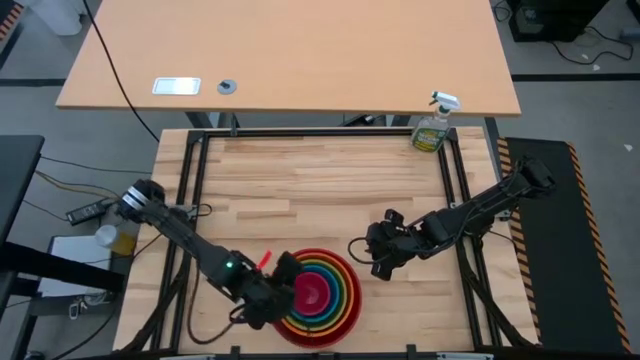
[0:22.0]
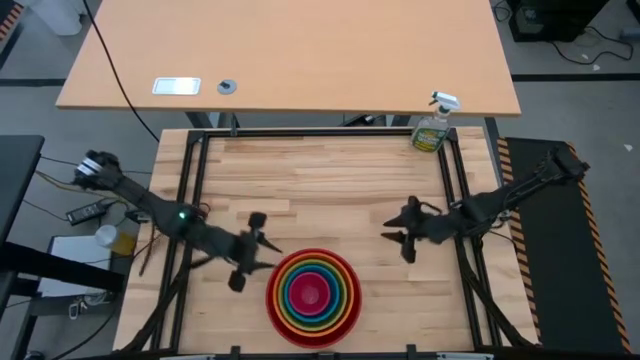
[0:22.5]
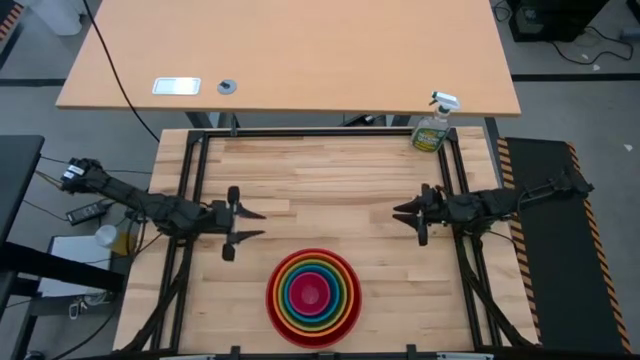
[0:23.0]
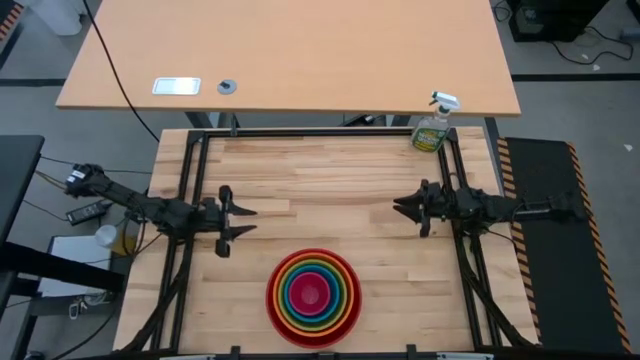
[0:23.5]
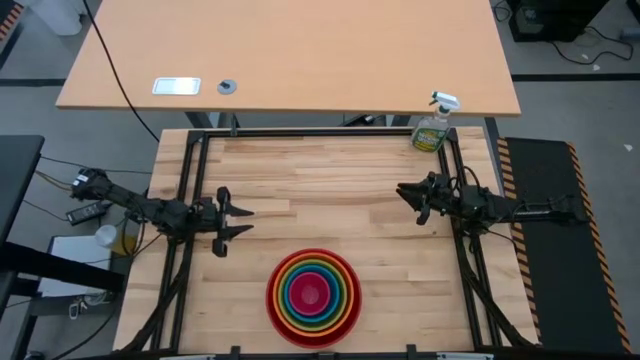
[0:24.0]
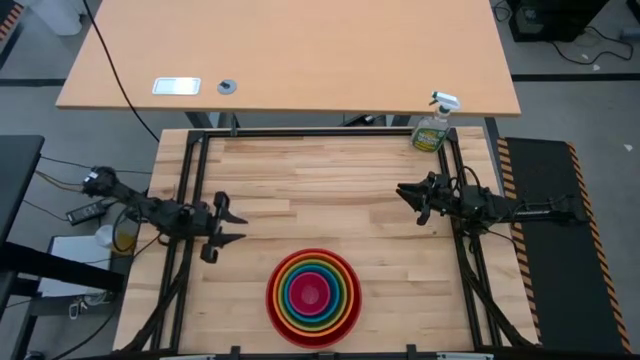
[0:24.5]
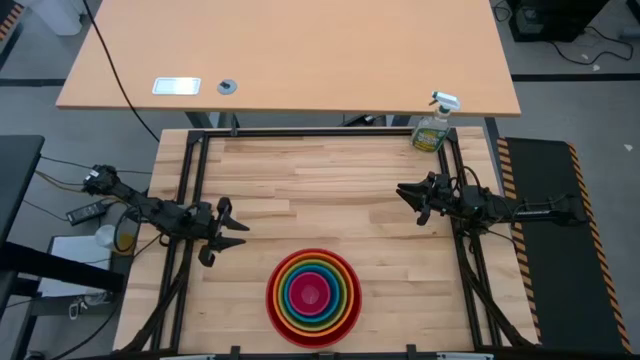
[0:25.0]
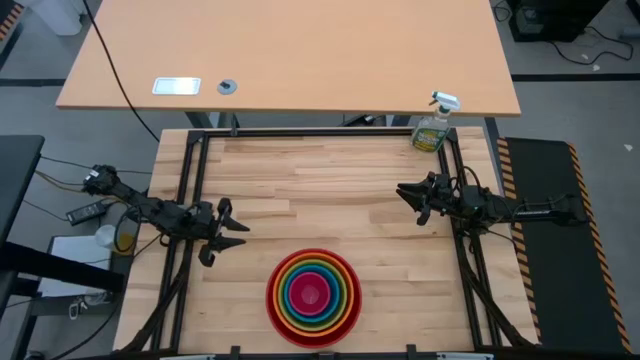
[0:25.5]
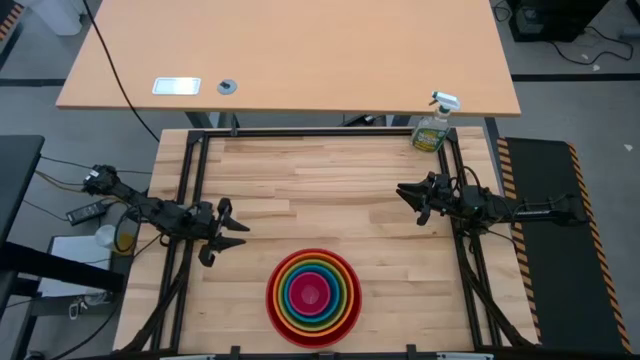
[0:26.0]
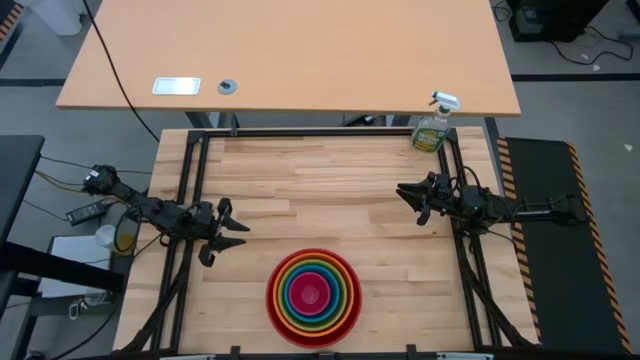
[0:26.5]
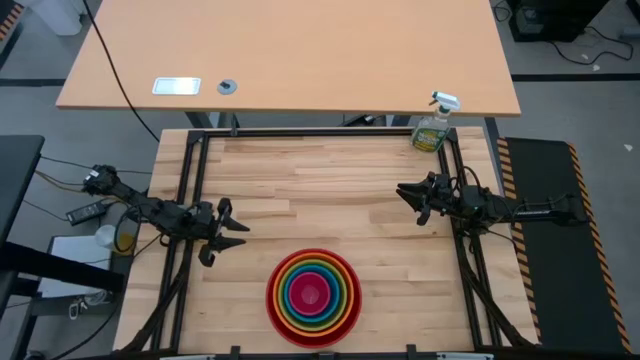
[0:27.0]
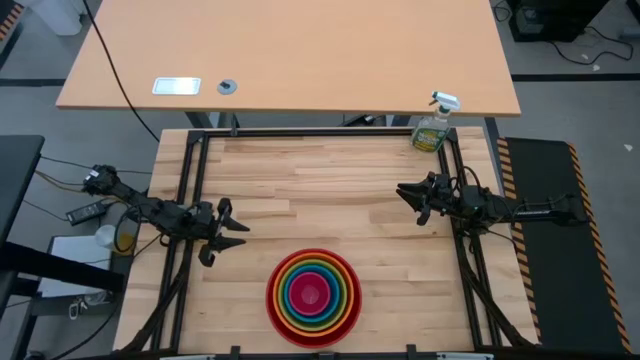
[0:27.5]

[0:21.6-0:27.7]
Return to Home Position

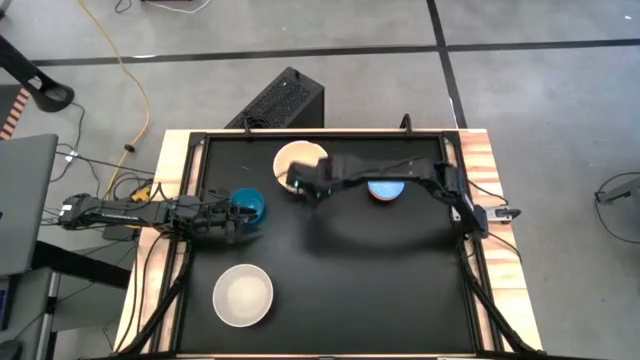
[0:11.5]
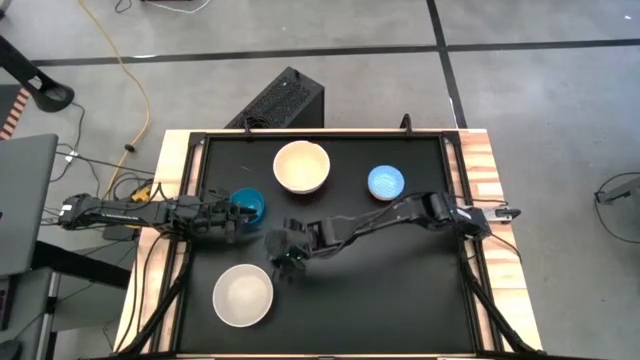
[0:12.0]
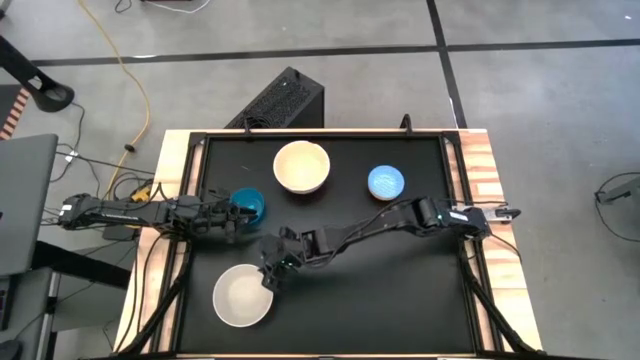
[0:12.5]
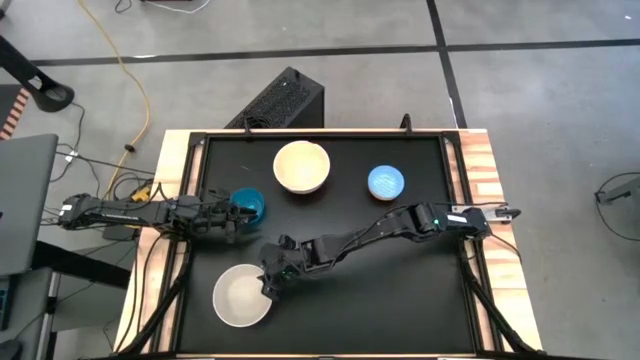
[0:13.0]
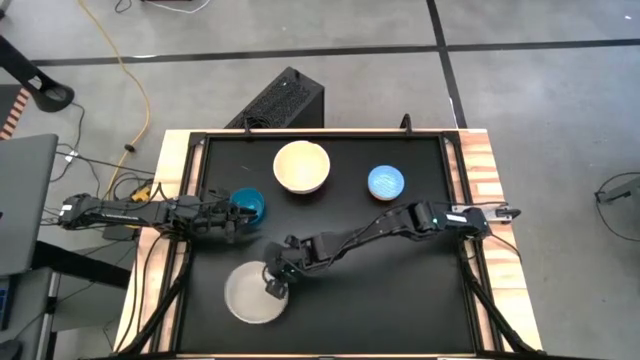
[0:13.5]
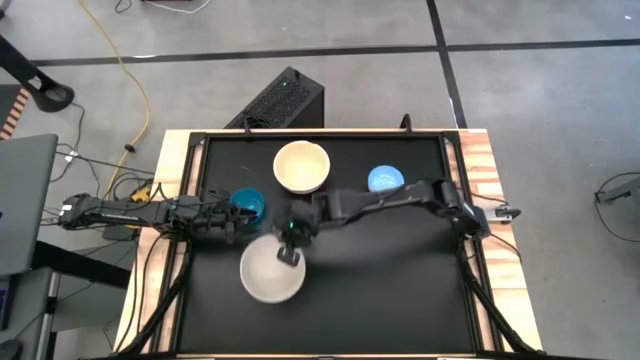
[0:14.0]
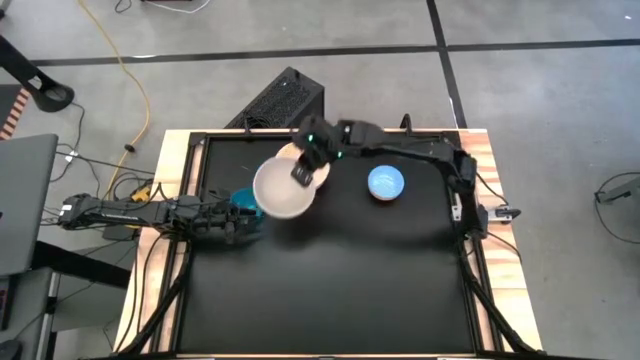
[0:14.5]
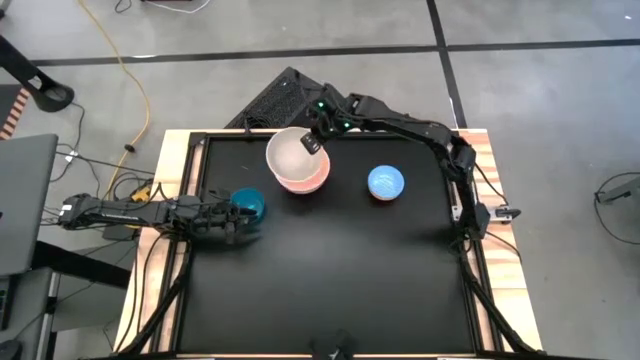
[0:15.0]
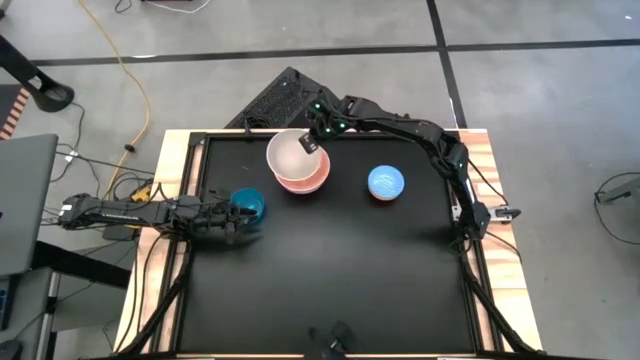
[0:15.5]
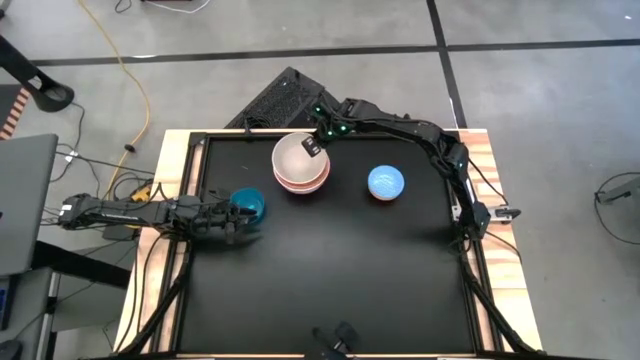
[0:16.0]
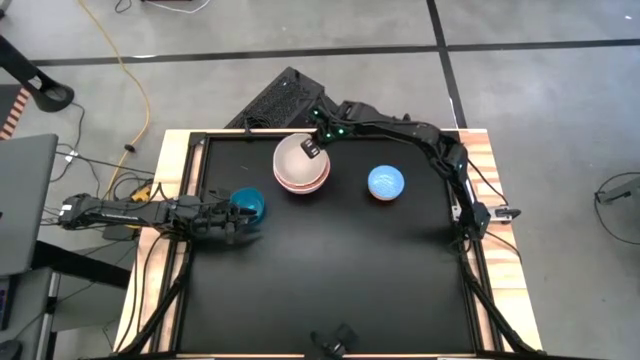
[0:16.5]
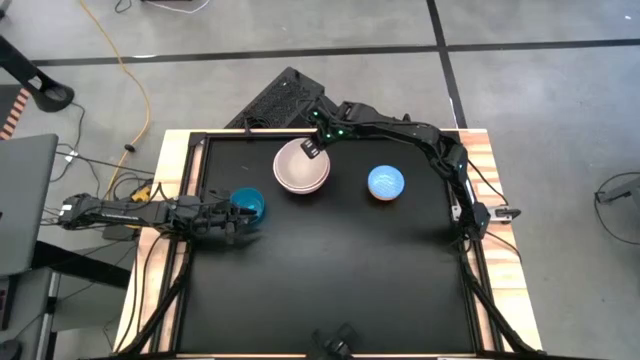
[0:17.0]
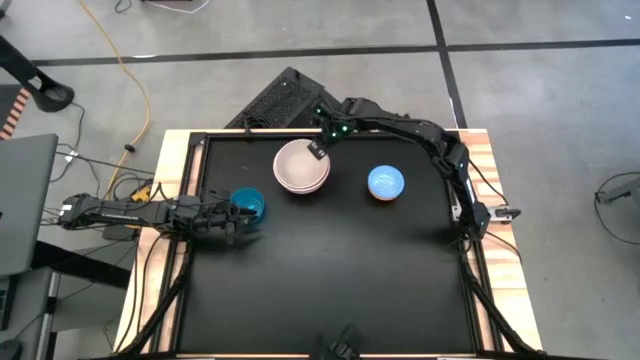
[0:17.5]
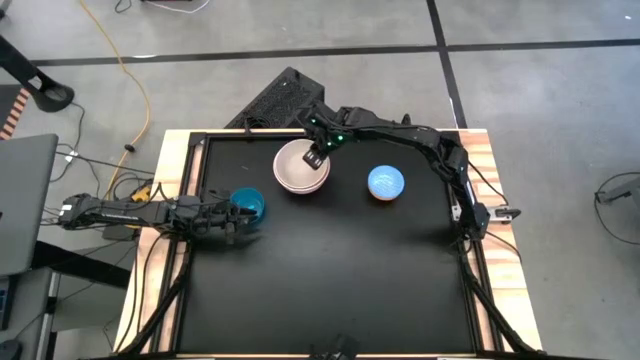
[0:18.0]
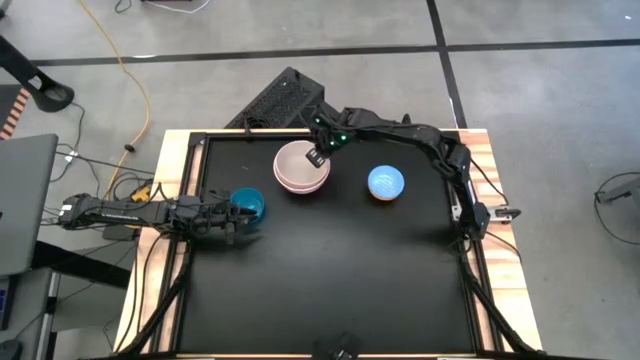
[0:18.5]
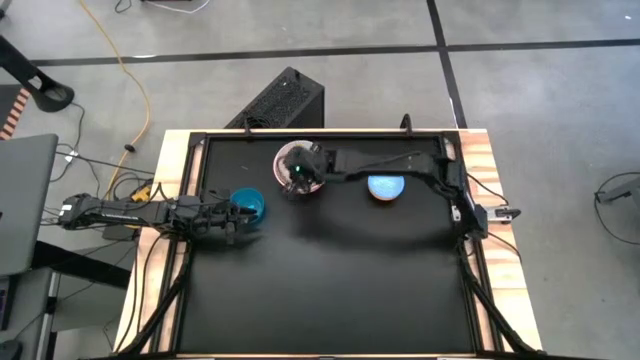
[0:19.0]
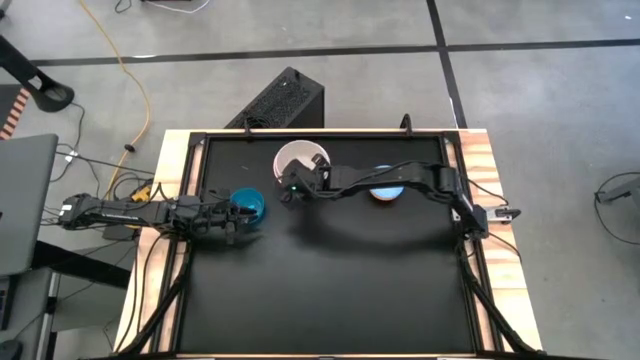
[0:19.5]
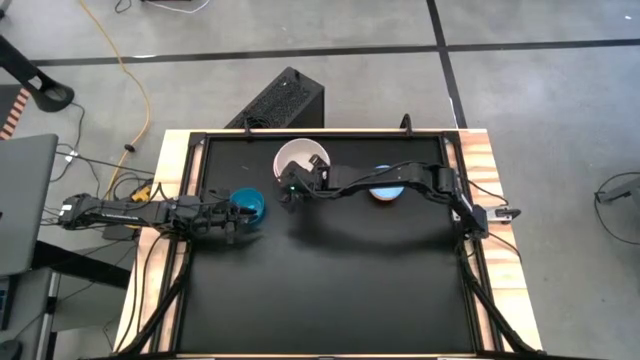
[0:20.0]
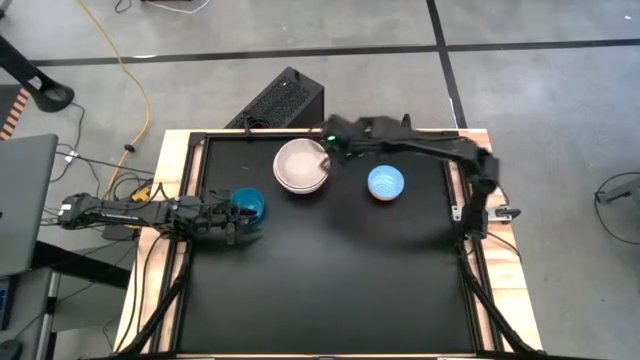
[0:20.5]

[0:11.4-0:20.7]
Stack the white bowl on top of the light orange bowl

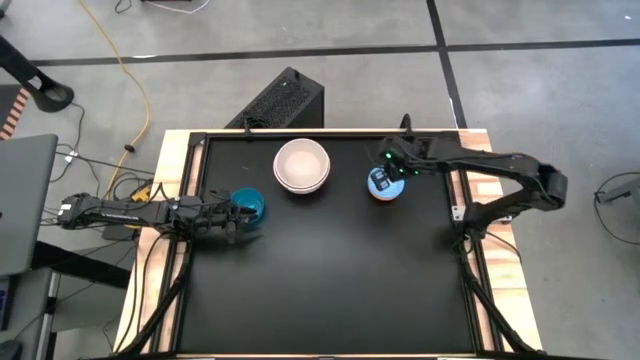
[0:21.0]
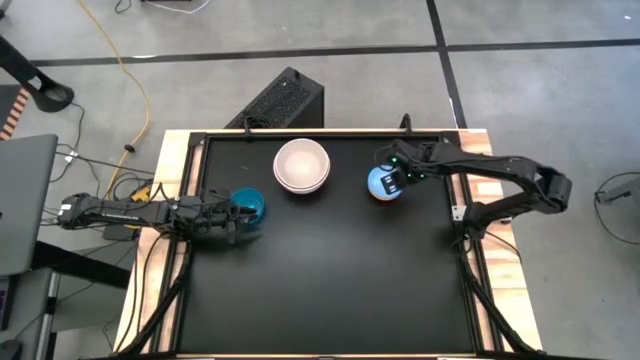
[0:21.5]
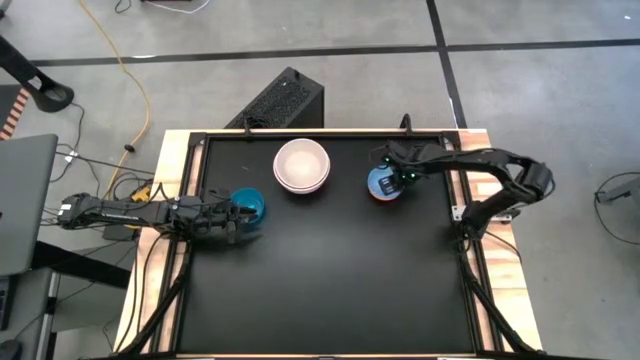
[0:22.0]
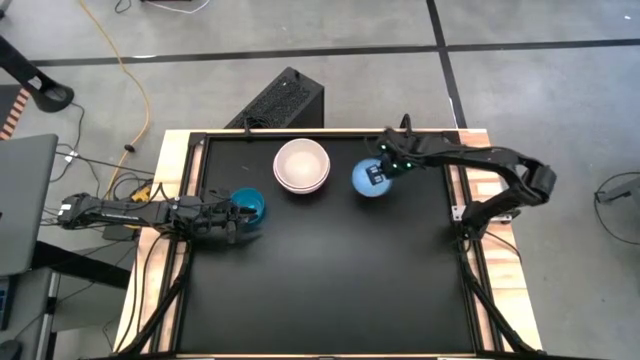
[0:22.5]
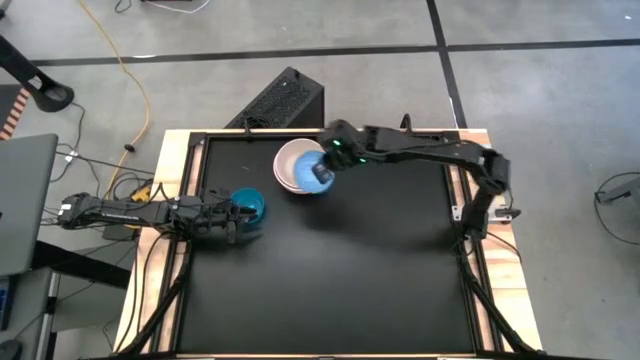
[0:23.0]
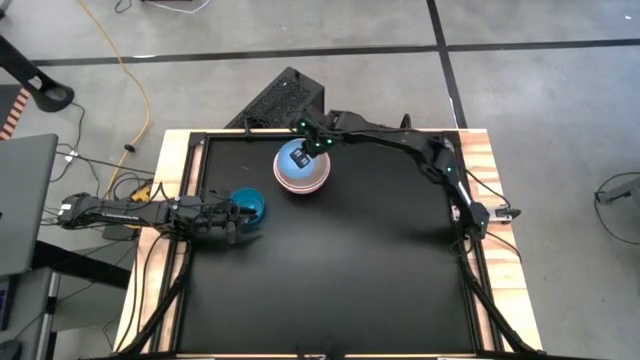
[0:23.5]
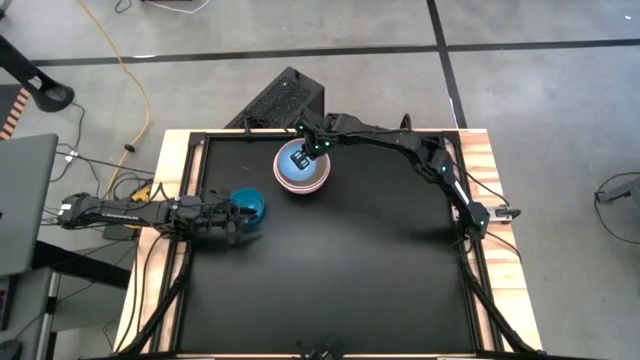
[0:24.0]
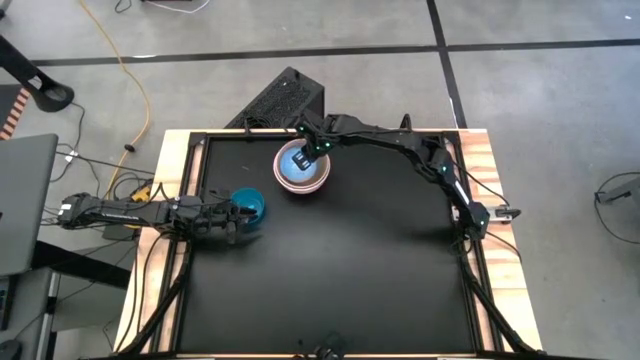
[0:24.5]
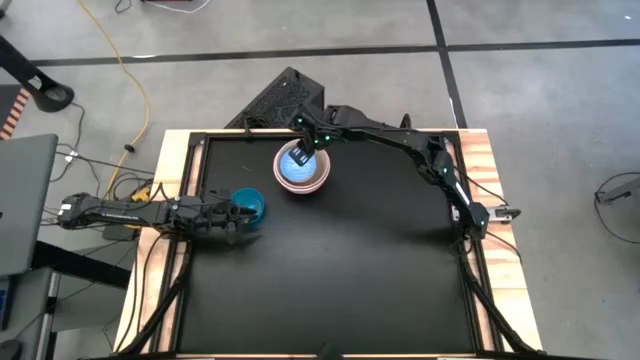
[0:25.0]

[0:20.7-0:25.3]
Stack the blue patterned bowl on top of the white bowl

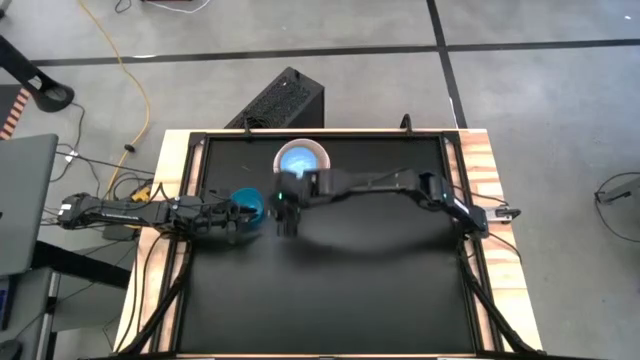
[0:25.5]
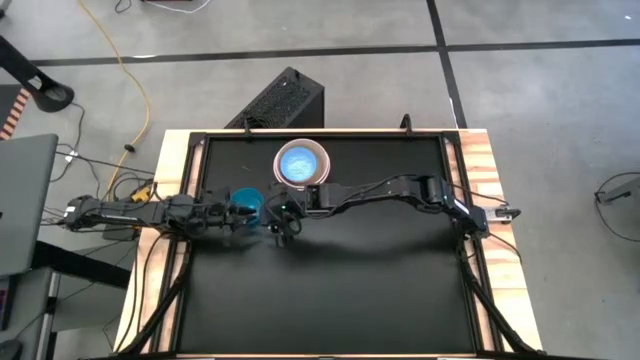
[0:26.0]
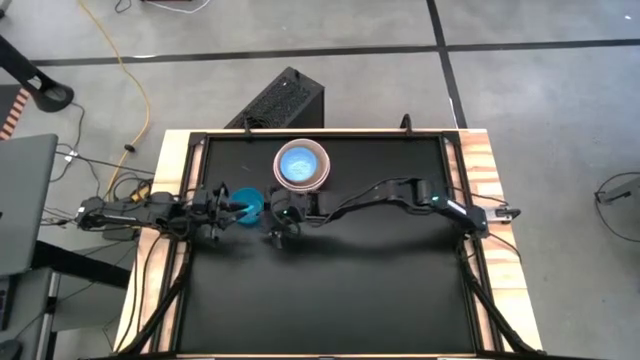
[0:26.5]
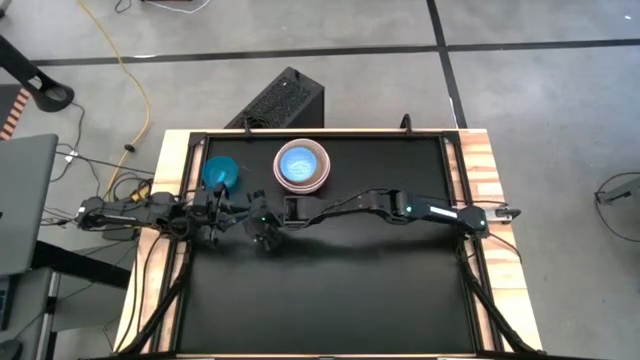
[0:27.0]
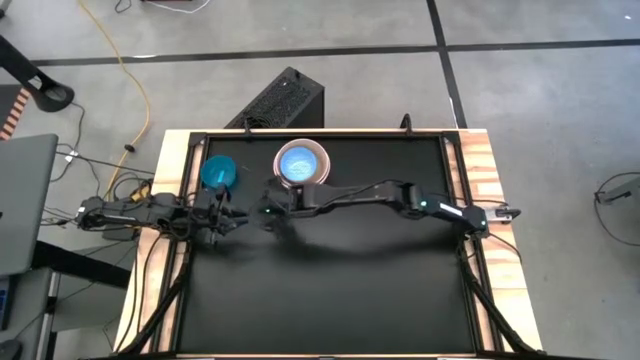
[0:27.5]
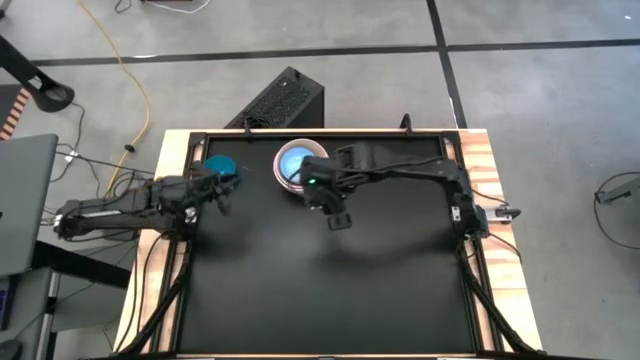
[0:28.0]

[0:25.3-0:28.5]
Stack the blue transparent bowl on top of the blue patterned bowl
